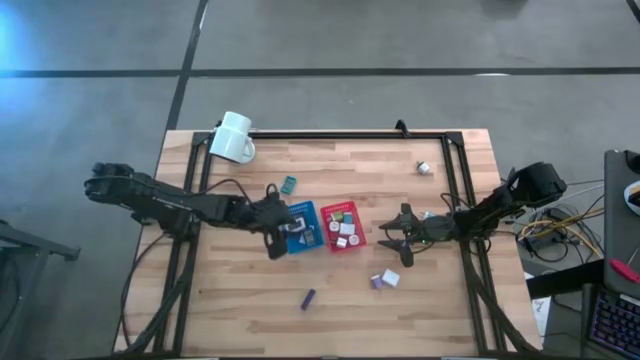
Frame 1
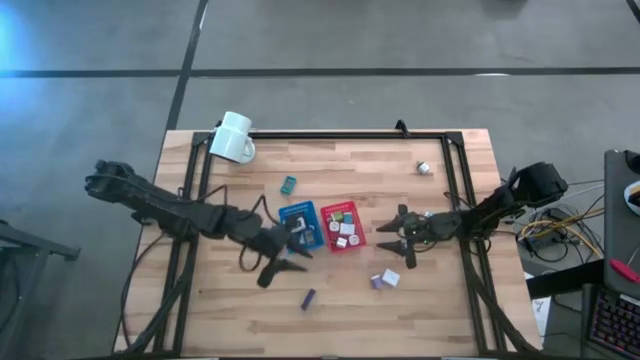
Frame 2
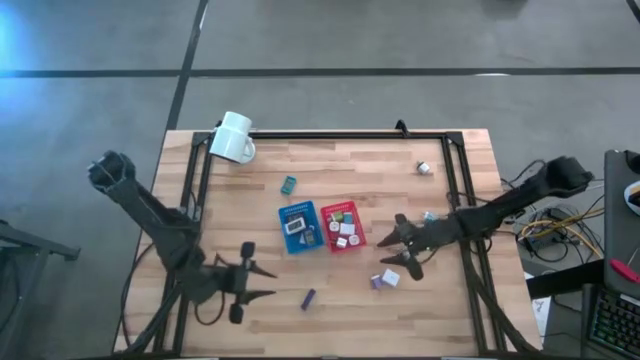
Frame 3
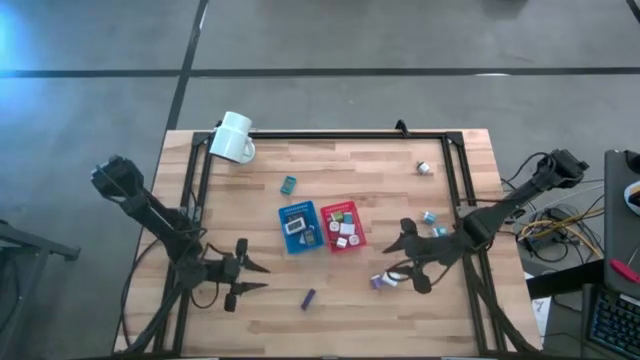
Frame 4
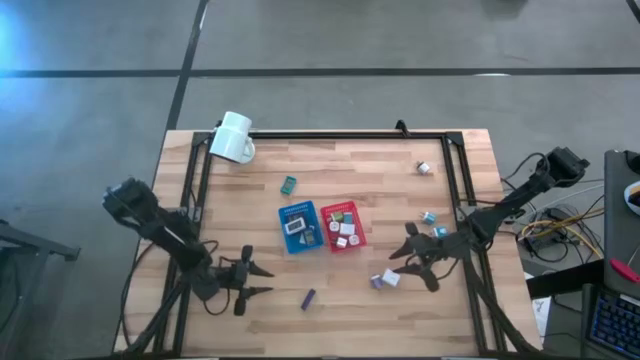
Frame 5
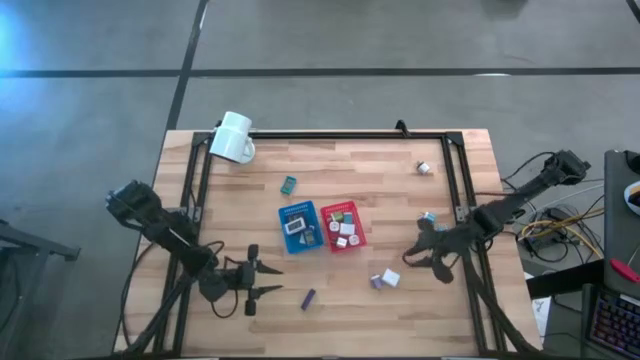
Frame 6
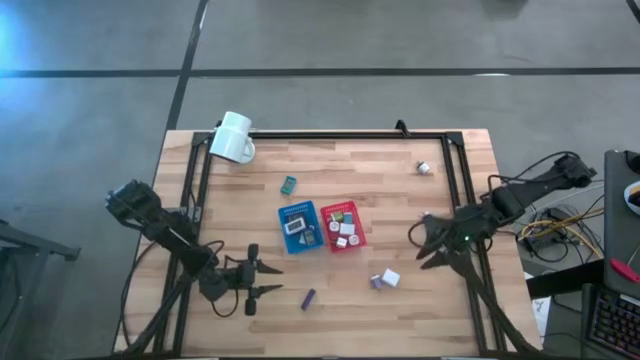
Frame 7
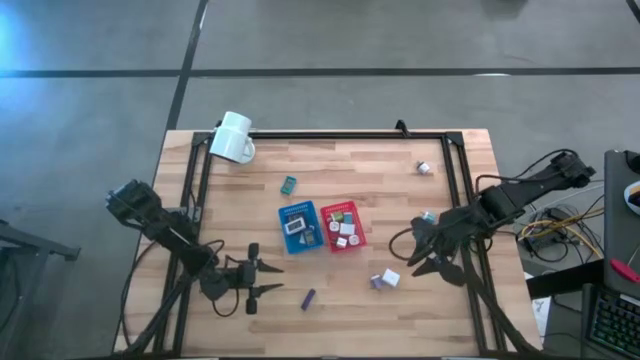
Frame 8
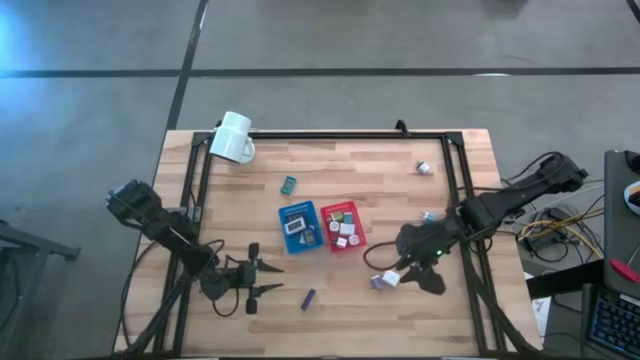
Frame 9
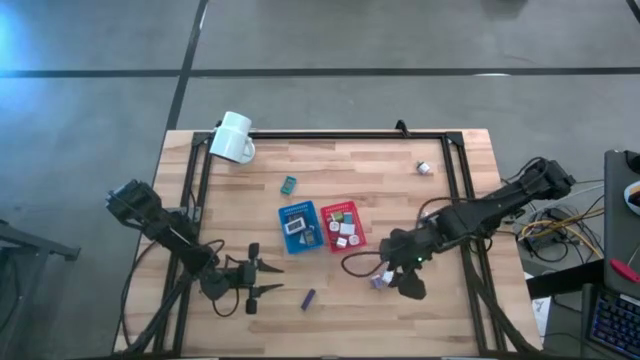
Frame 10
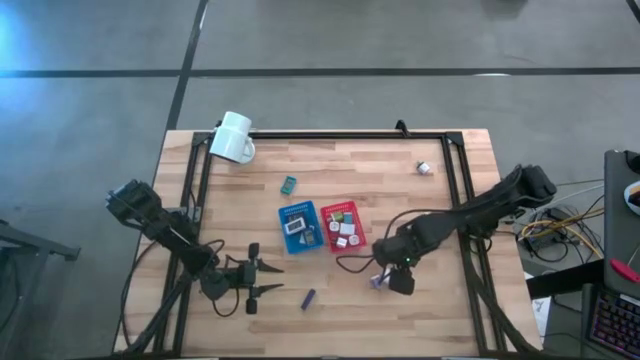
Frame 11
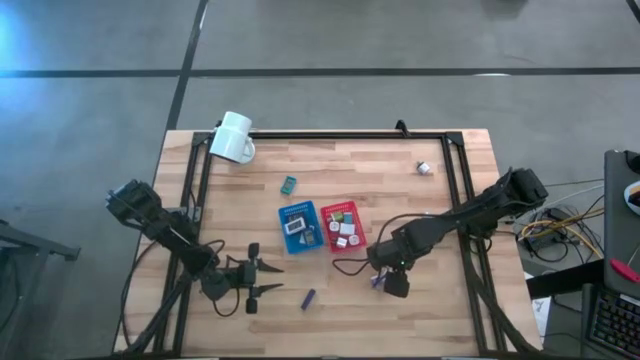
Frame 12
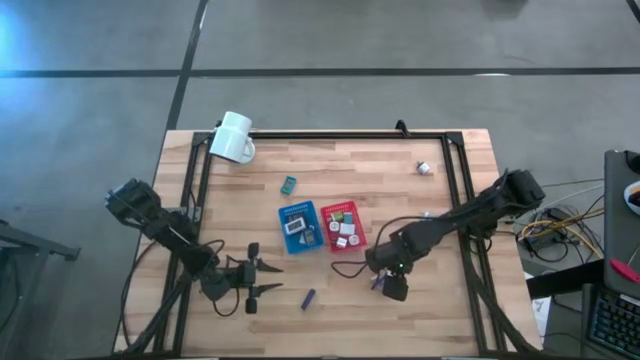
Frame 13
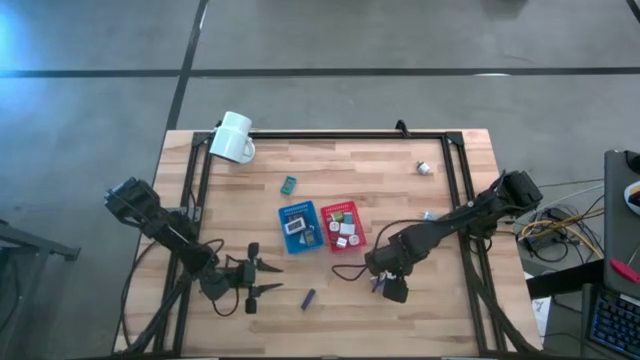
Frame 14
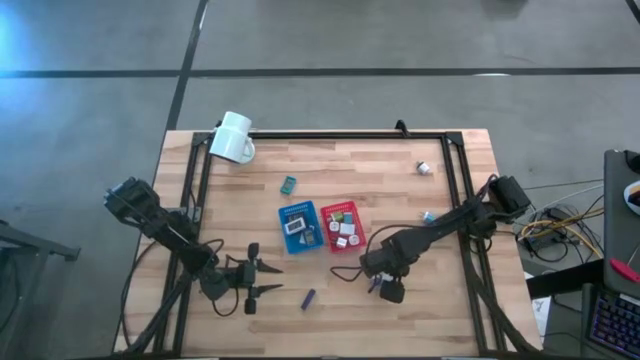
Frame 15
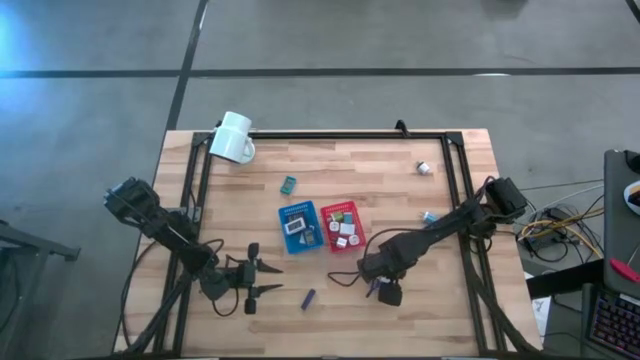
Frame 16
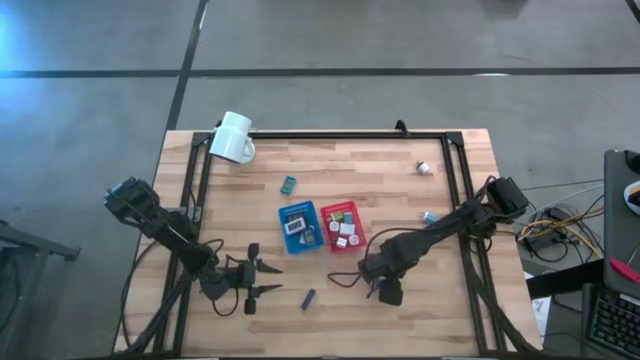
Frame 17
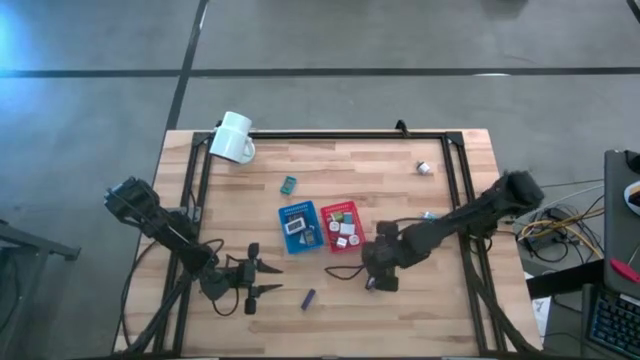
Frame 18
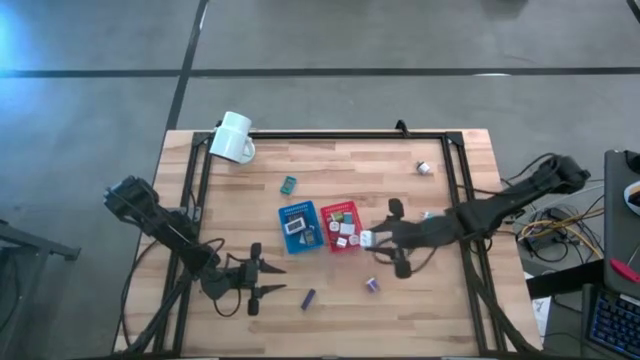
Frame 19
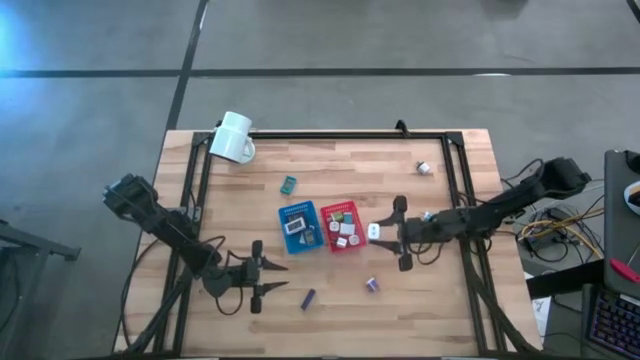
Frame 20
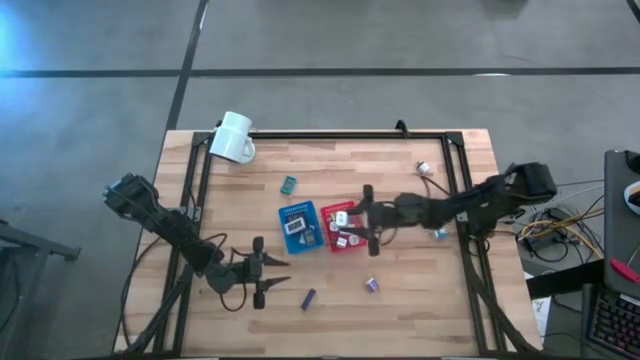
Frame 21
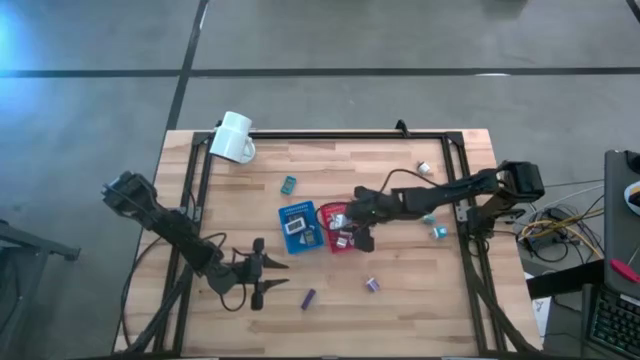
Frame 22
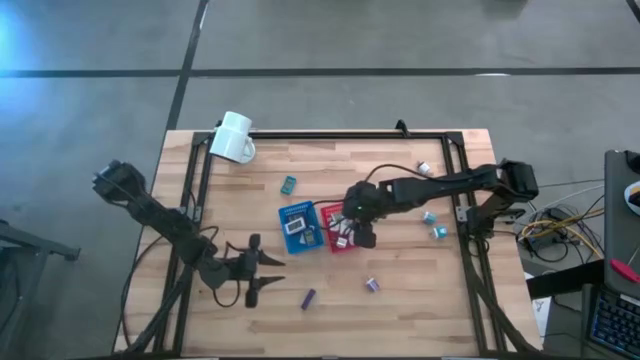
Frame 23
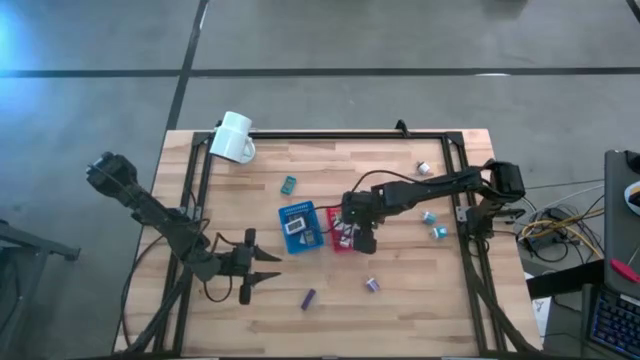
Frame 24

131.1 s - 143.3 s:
Task: Pick & Place Office items
Put the white charger adapter into the red bin

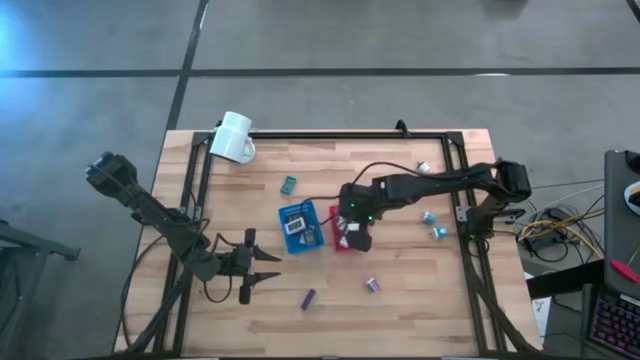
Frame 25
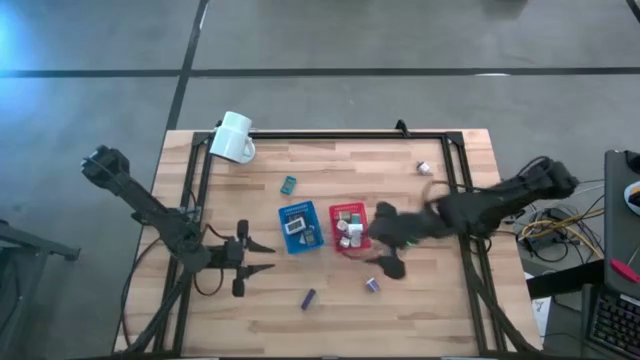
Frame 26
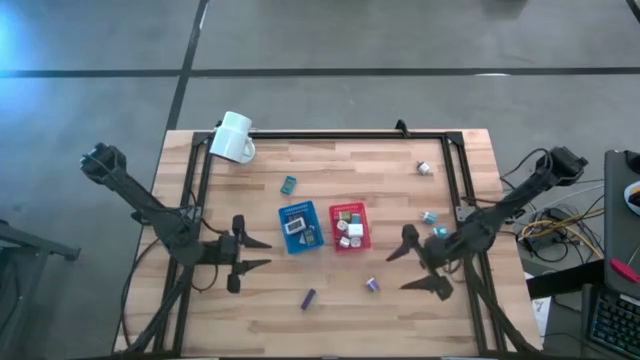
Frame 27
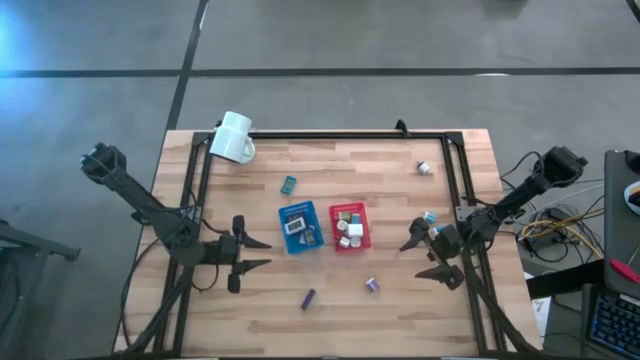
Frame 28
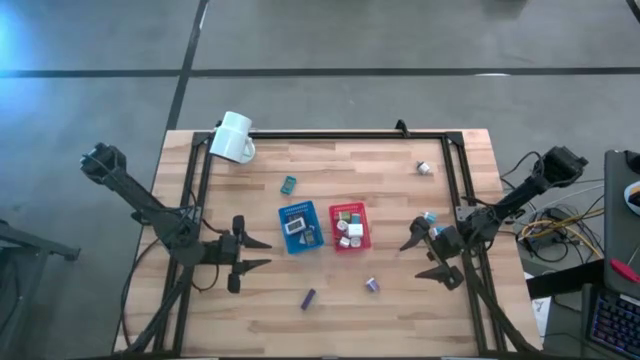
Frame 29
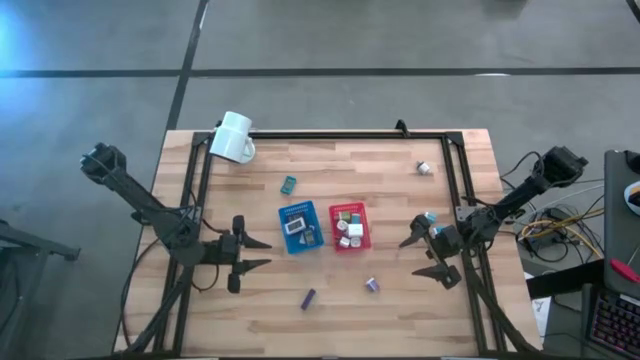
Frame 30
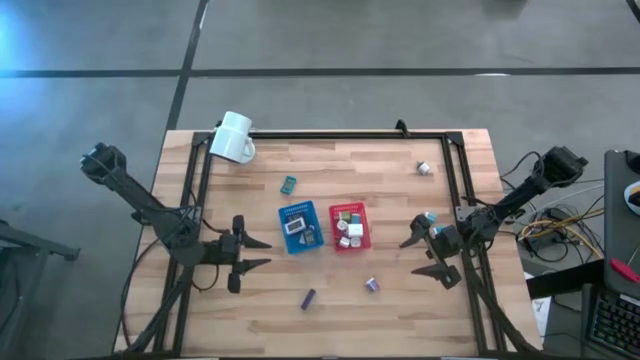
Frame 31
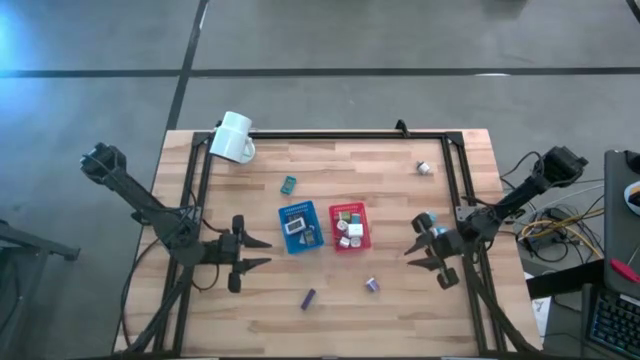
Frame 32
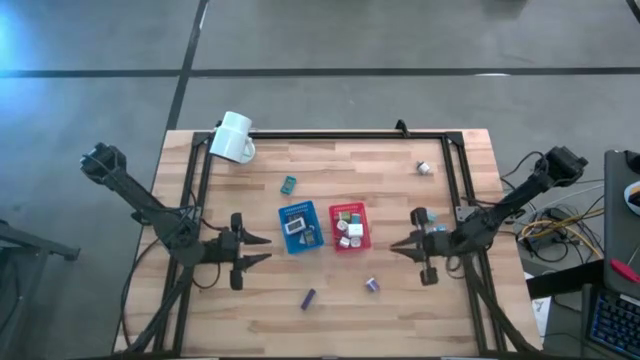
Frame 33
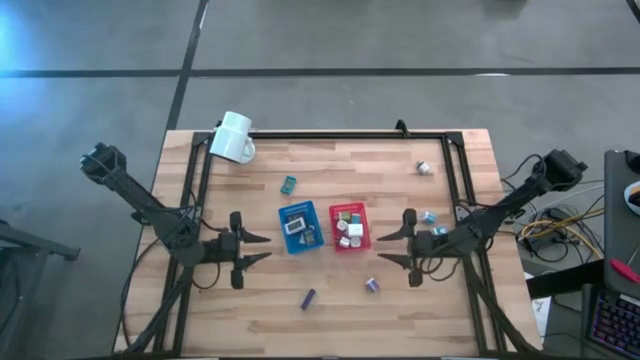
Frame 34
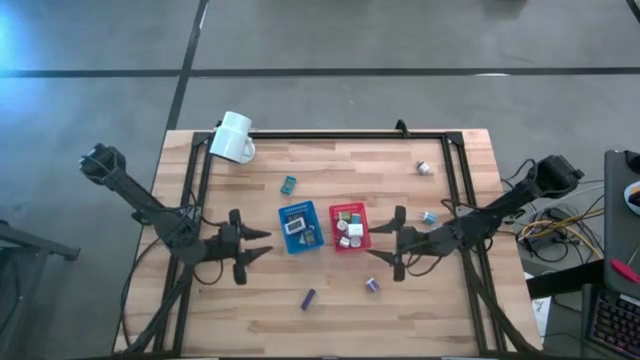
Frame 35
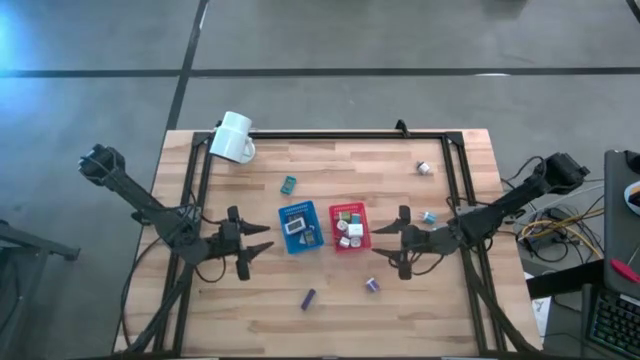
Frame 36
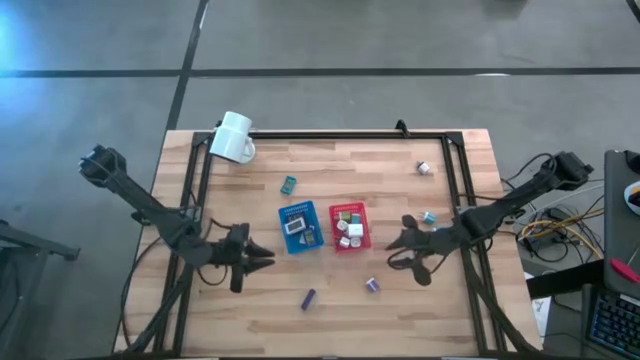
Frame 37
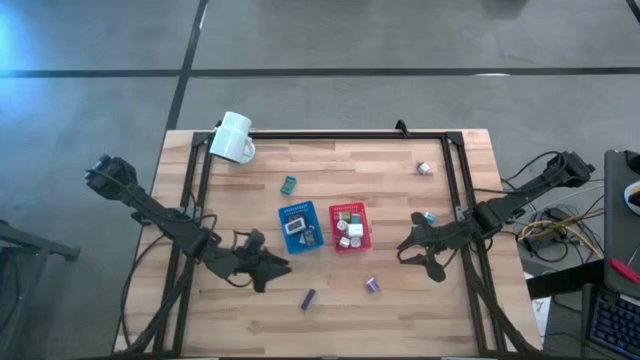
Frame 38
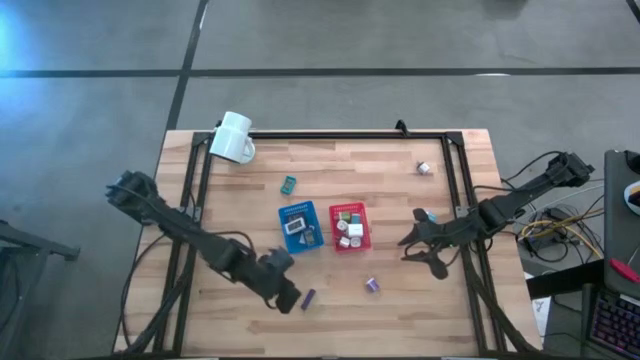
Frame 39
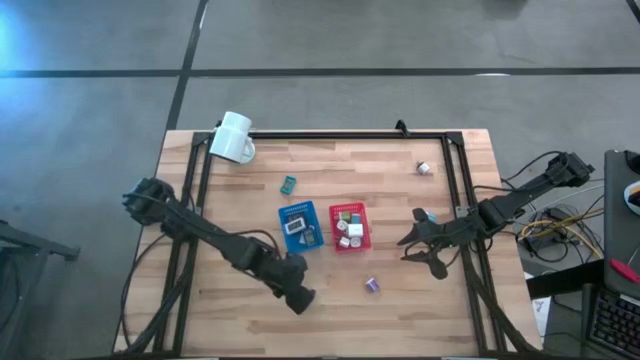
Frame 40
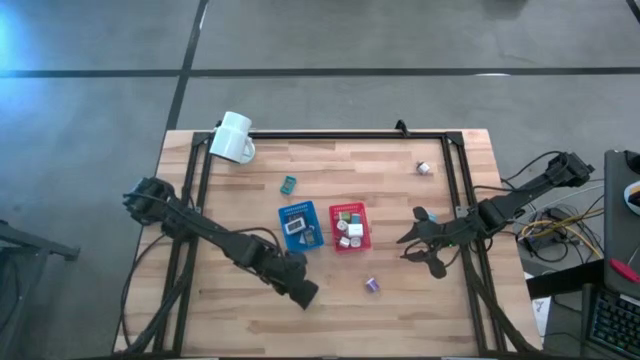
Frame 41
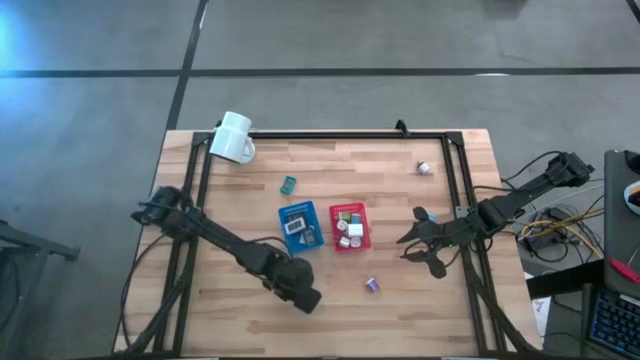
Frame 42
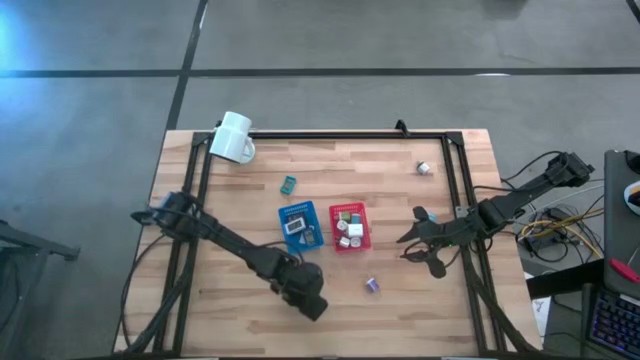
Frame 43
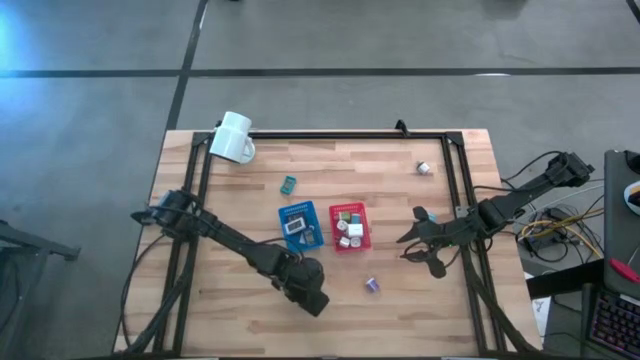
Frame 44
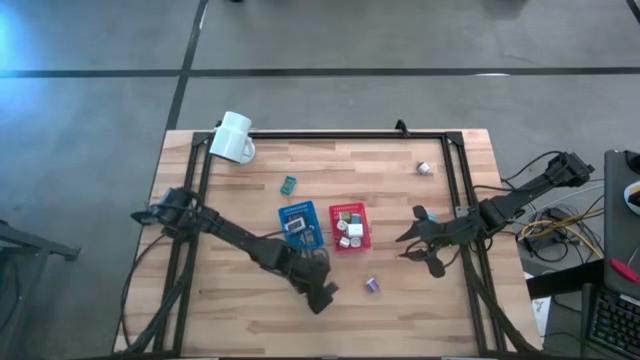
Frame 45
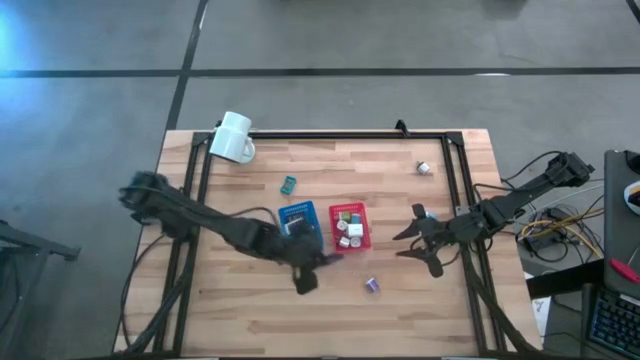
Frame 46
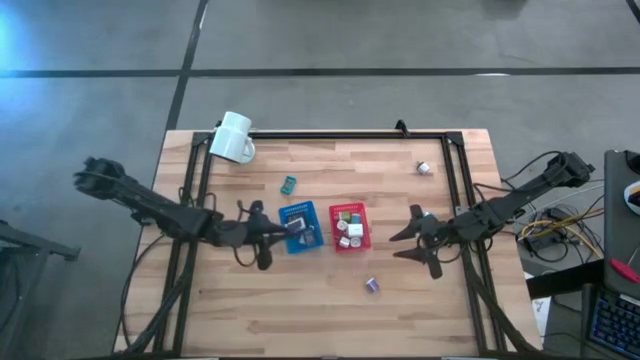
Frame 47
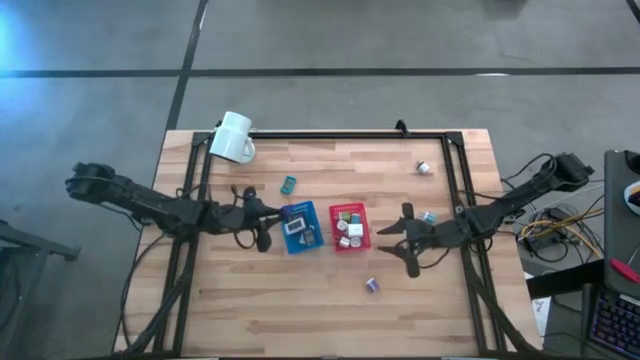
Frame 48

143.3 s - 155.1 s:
Put the violet digital clock into the blue bin
